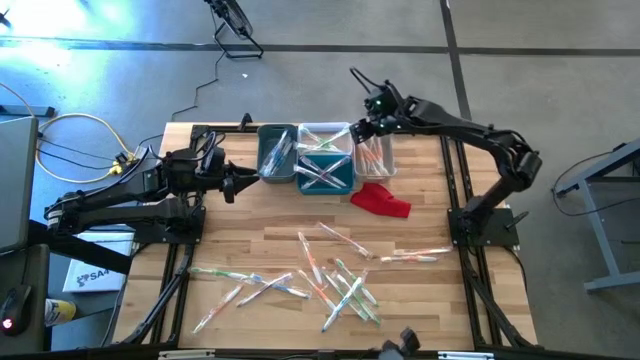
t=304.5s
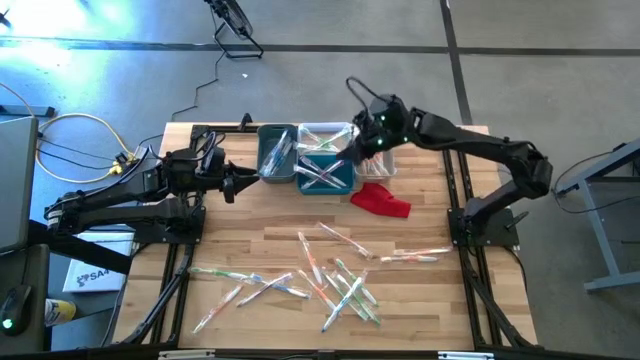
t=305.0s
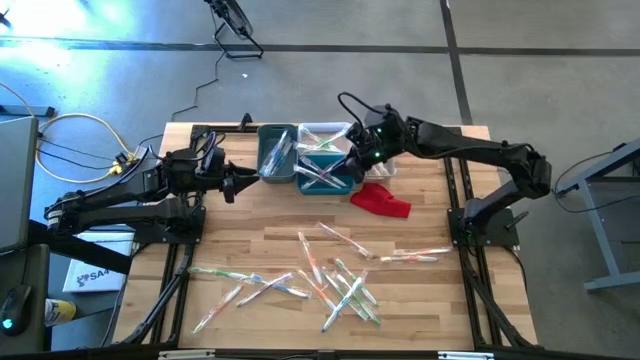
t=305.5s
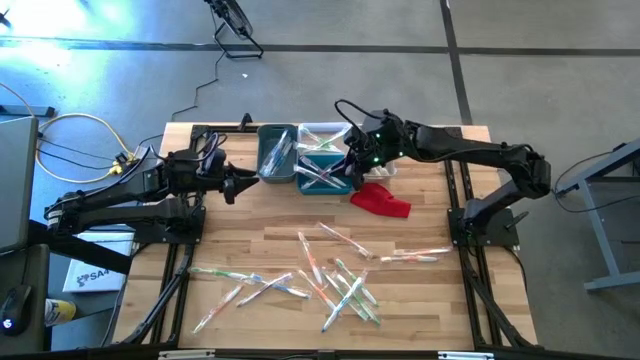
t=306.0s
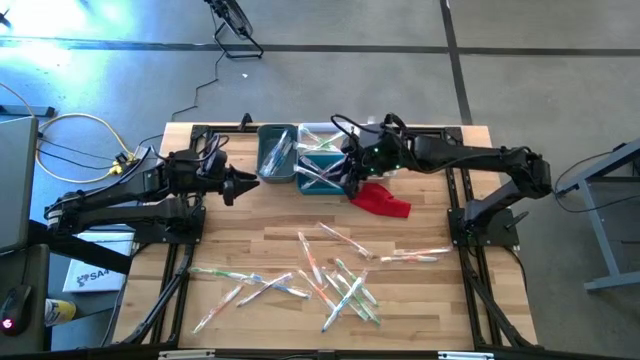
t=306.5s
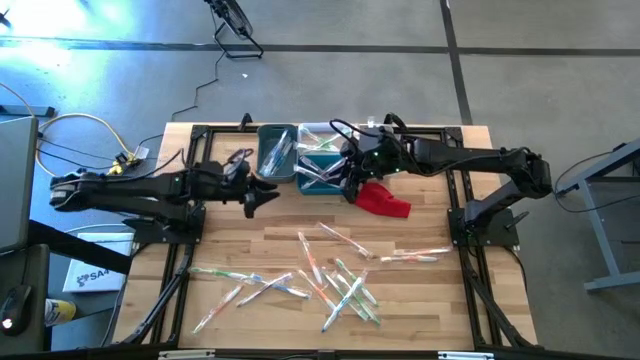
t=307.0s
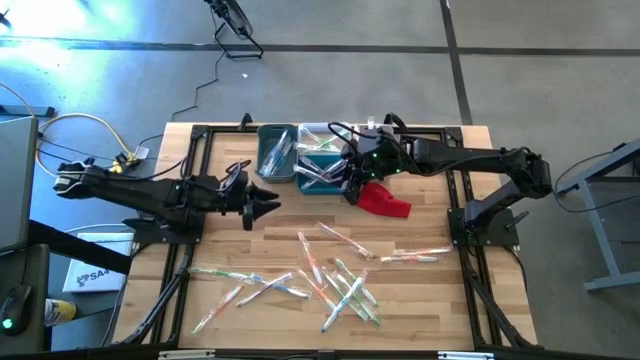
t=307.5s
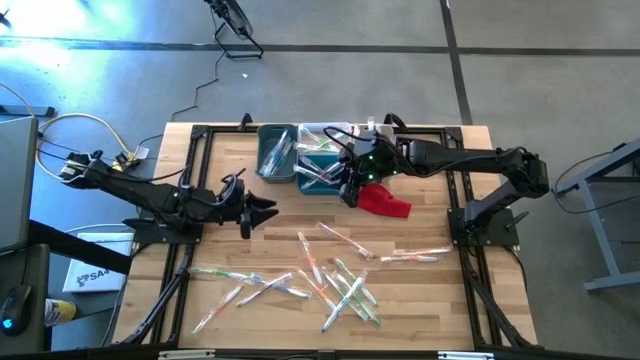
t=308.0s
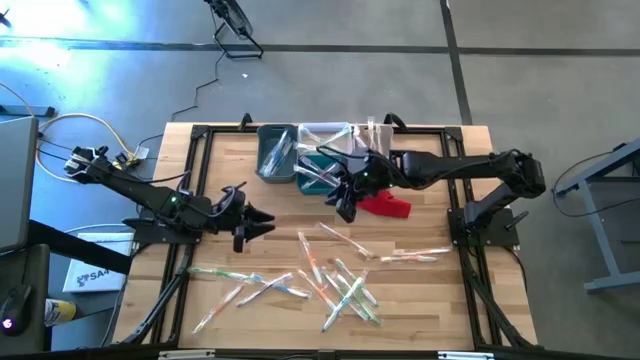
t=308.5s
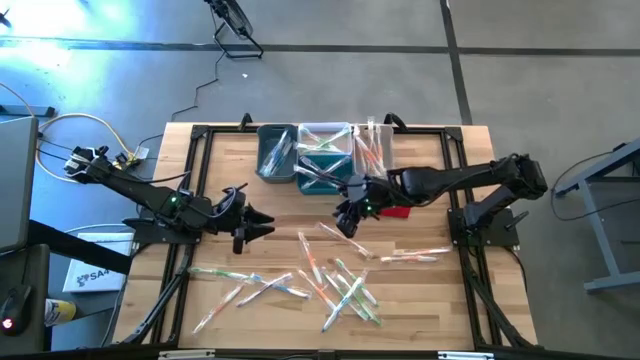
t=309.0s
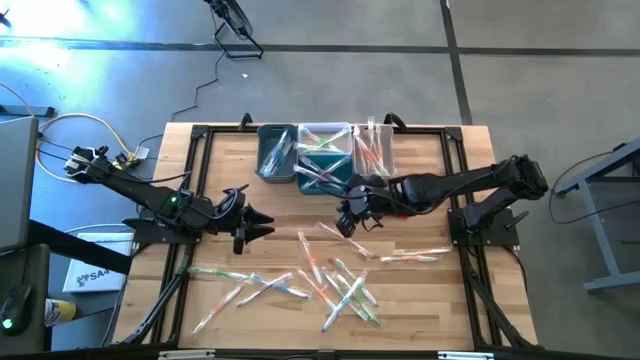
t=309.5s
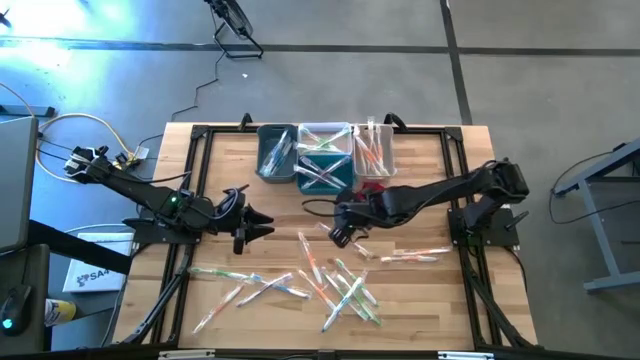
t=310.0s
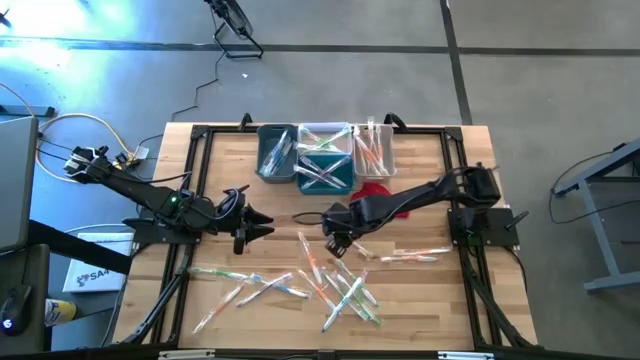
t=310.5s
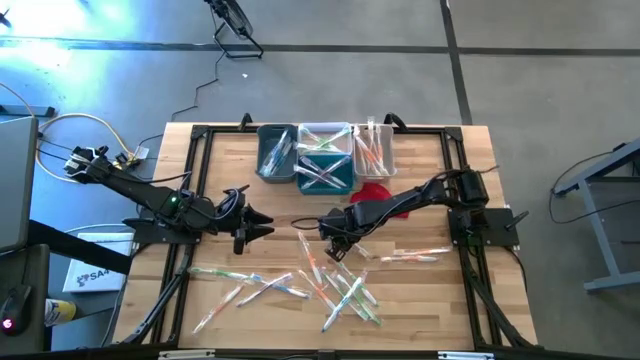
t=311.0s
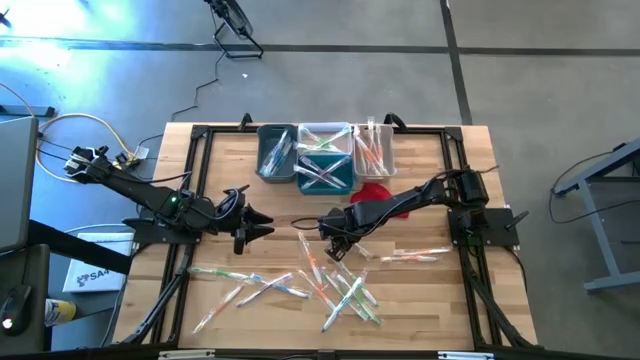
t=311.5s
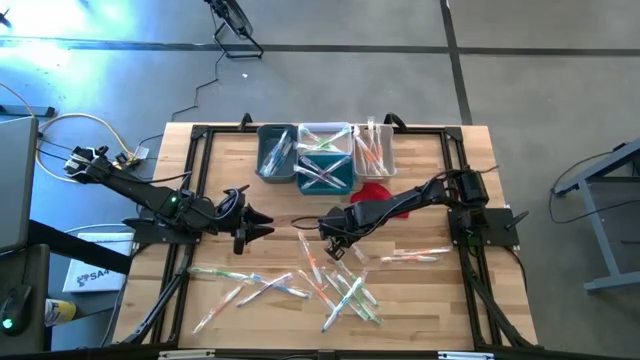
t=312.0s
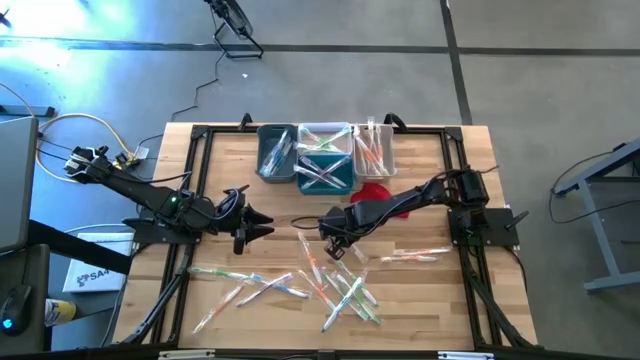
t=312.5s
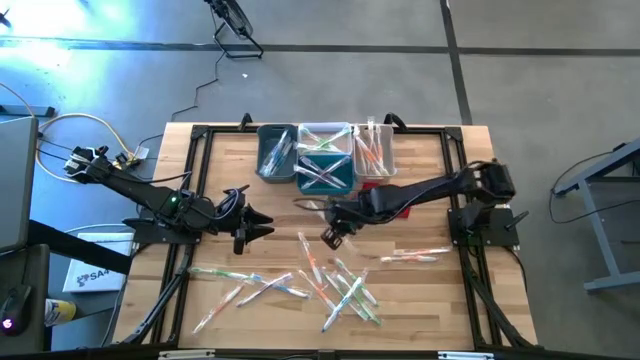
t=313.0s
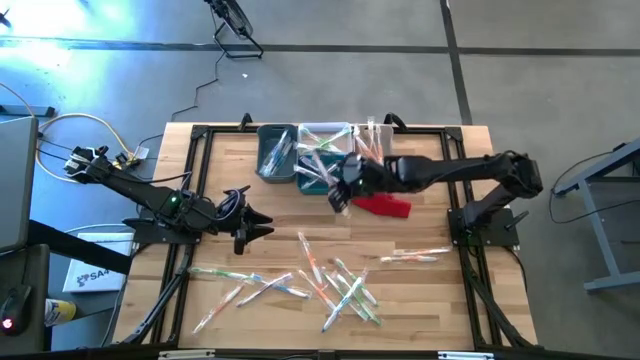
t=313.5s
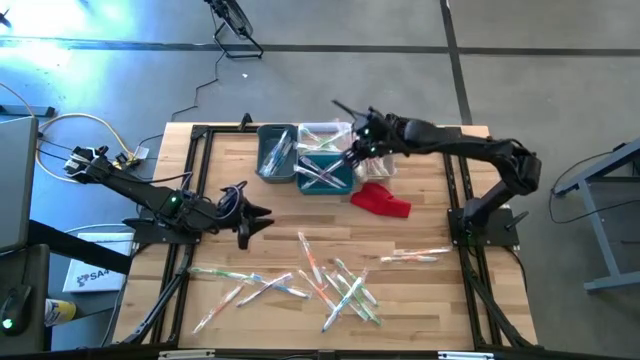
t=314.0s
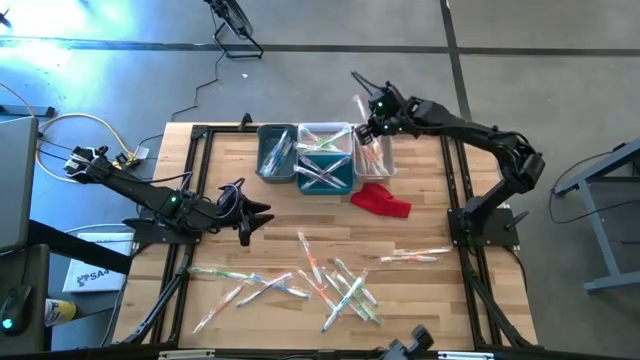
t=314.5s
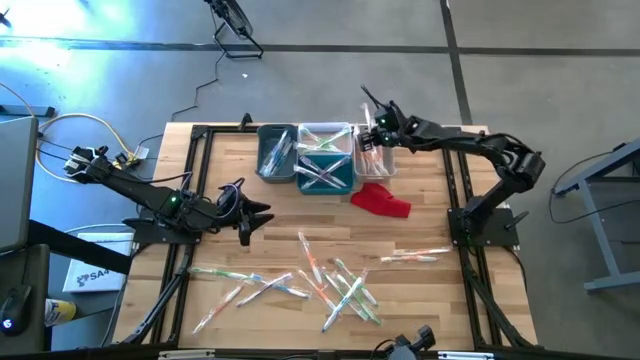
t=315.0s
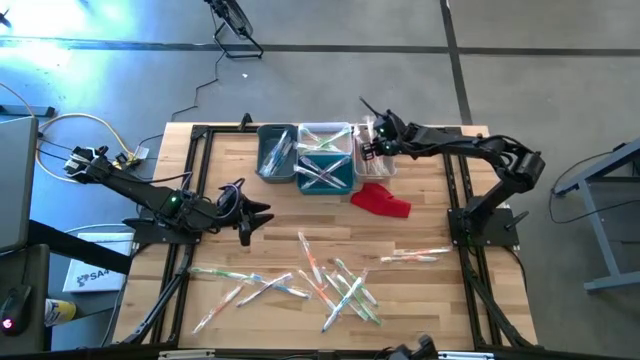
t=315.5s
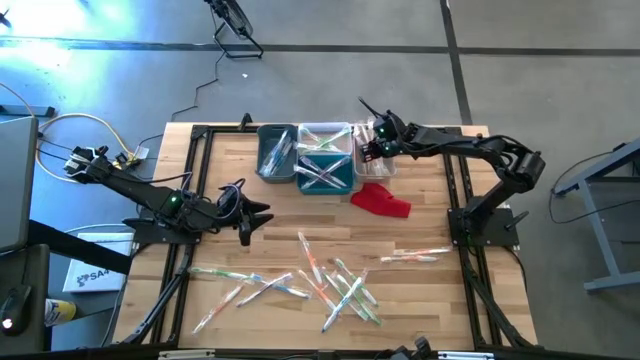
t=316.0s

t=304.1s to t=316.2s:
Task: Pick & Place Toothbrushes
Put the orange toothbrush into the white bin

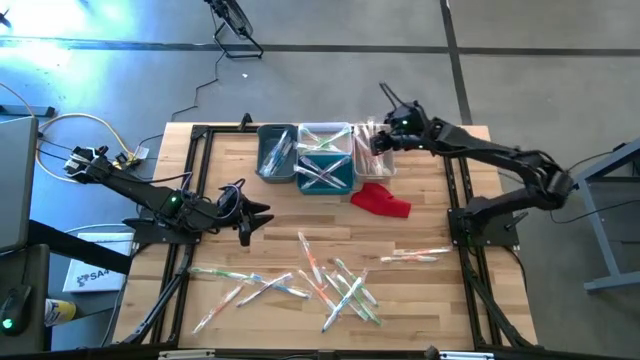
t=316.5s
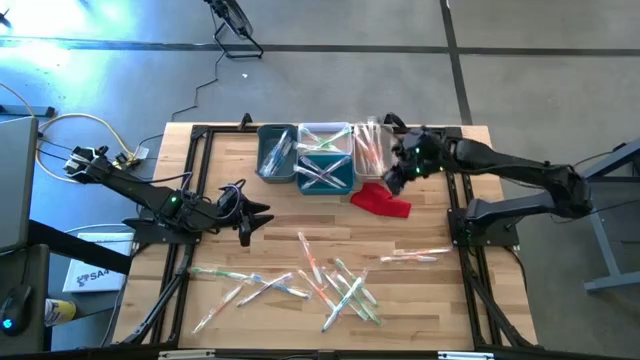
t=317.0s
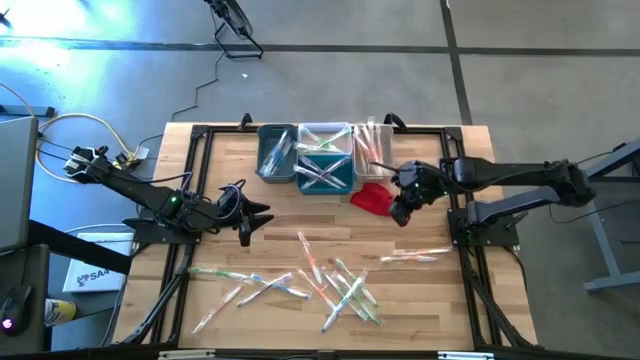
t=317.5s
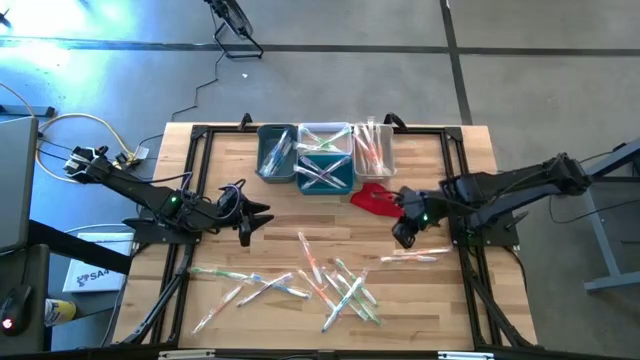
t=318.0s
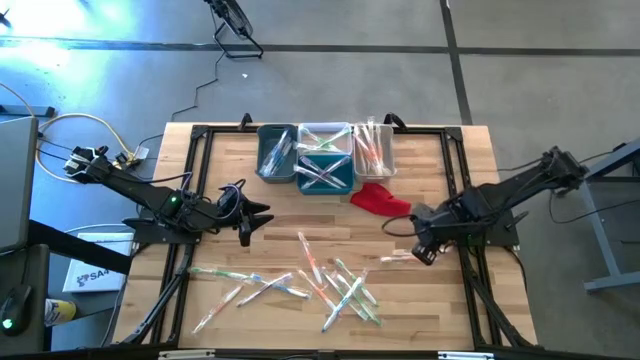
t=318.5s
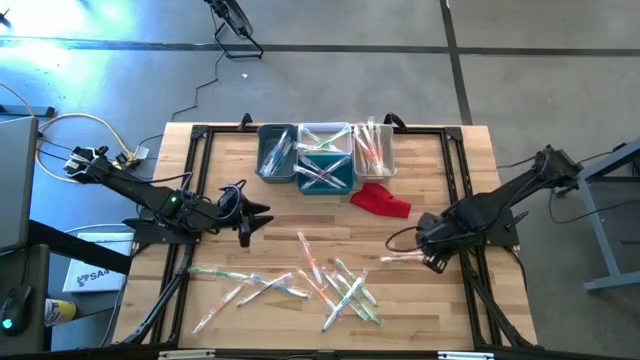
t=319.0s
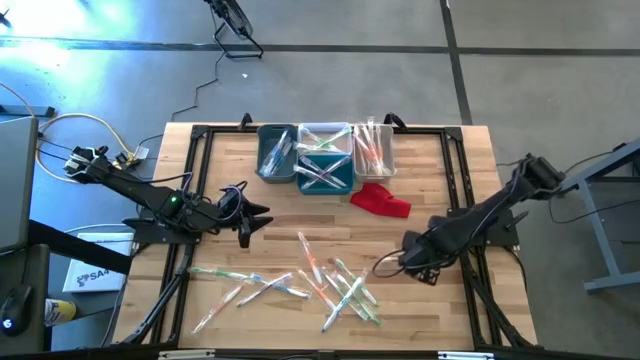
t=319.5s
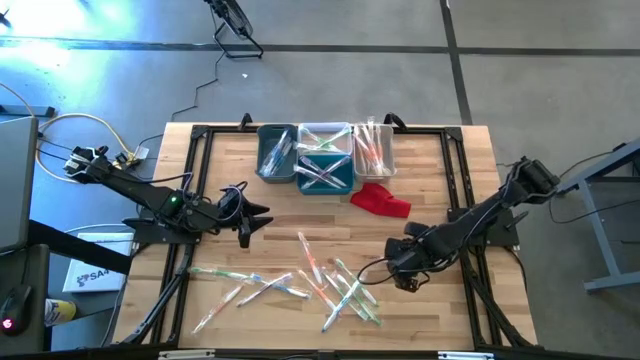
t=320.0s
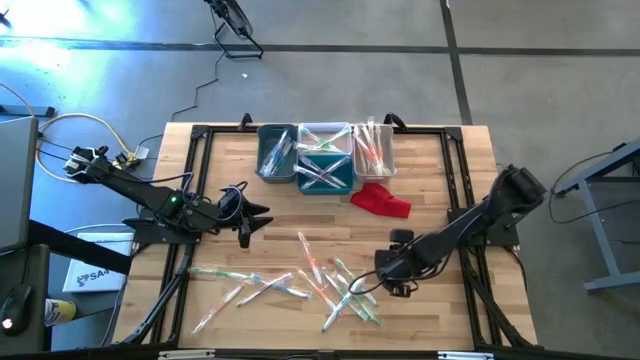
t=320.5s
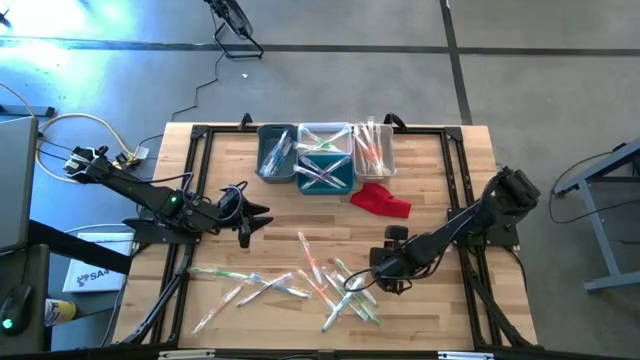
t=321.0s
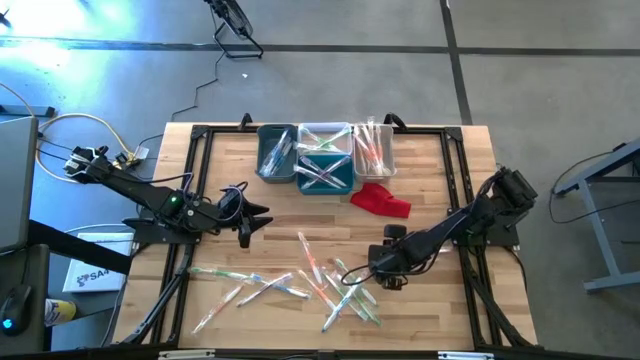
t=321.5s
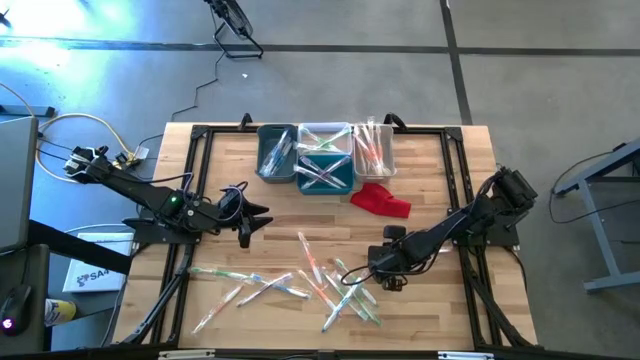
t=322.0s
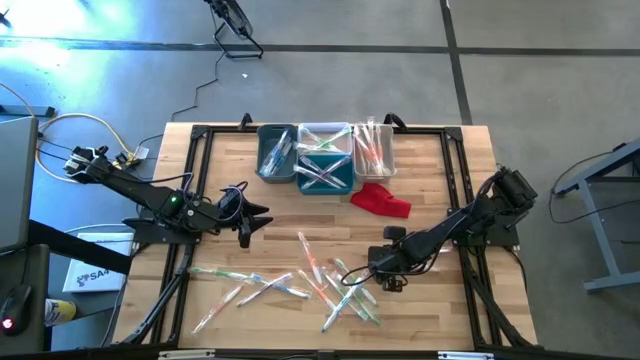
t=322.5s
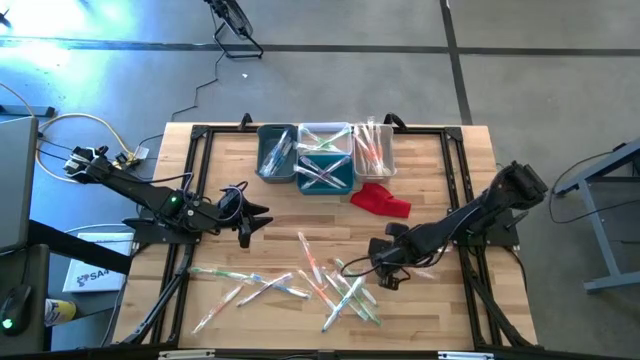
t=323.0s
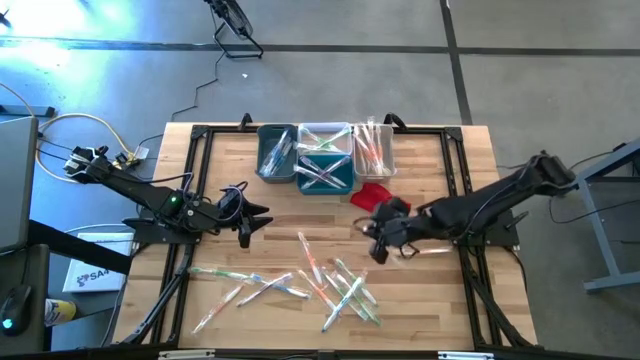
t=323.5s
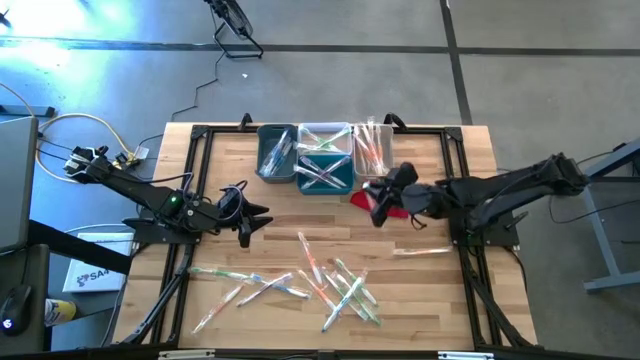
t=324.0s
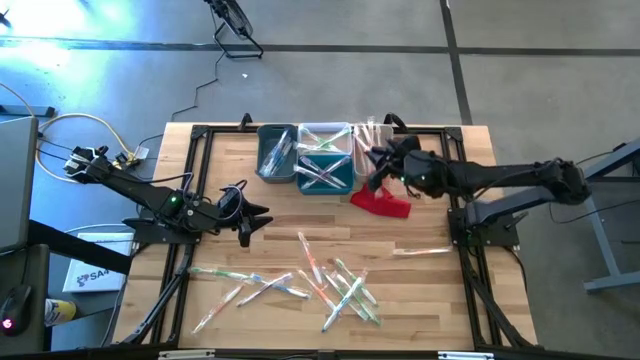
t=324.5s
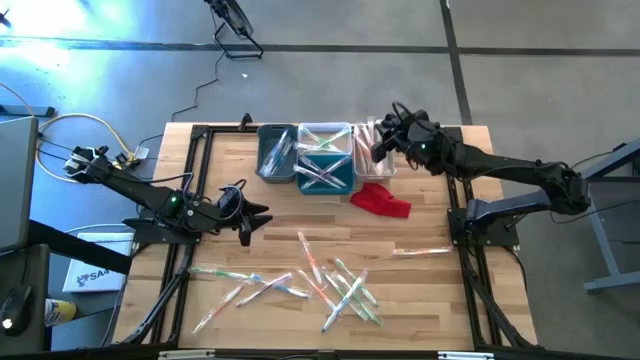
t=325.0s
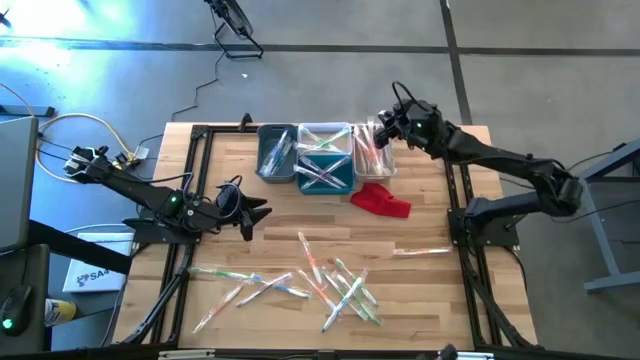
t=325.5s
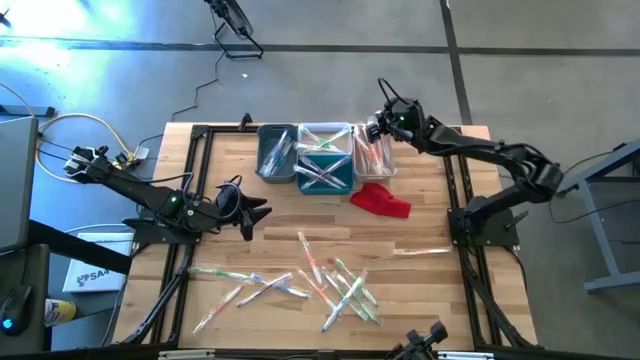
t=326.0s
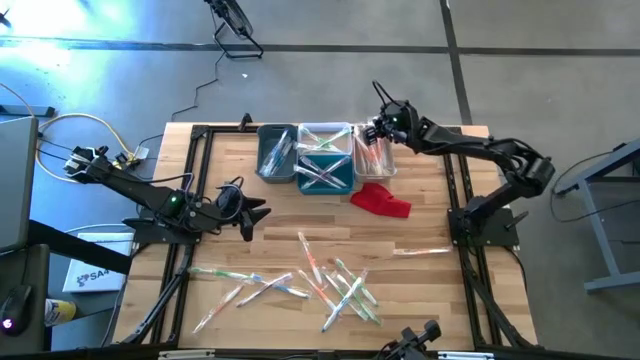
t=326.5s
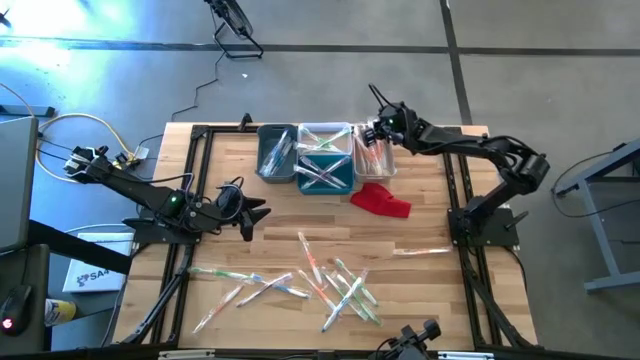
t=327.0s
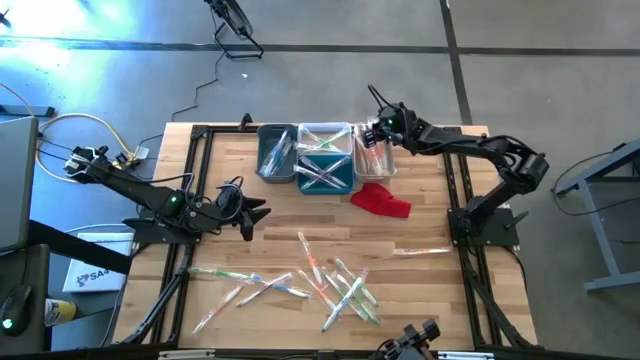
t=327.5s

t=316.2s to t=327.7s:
Put the orange toothbrush into the white bin
